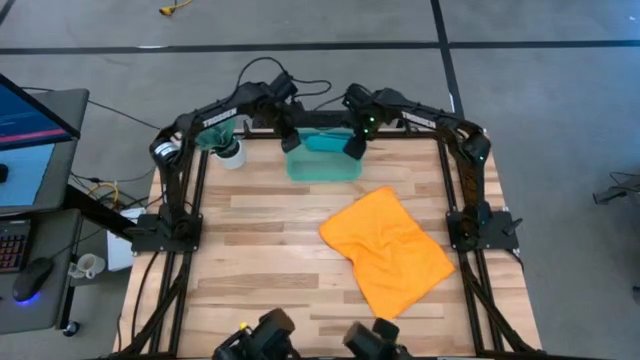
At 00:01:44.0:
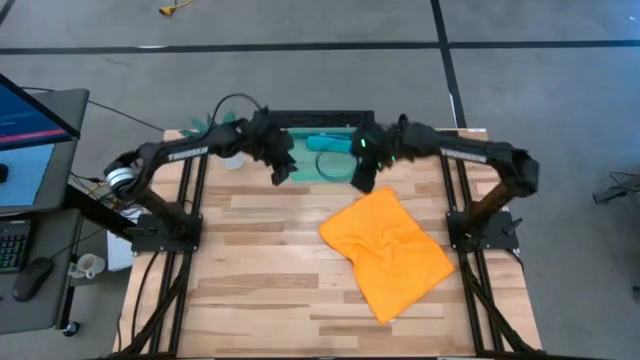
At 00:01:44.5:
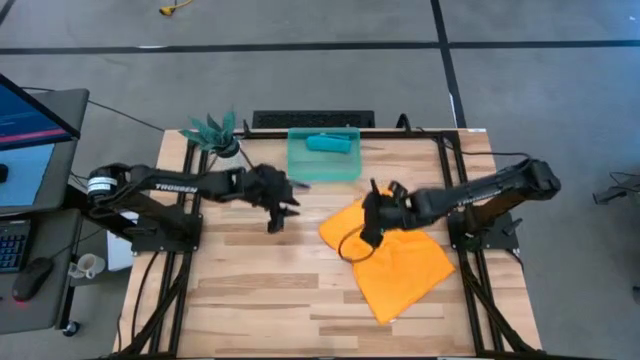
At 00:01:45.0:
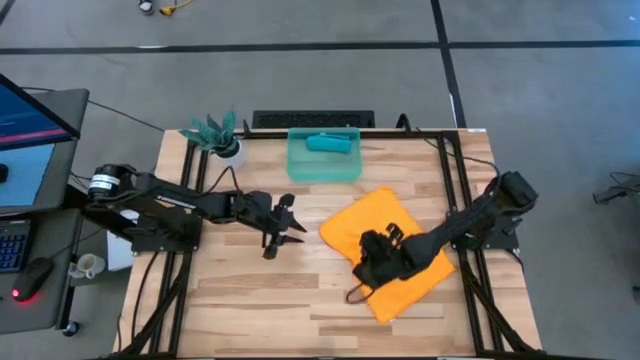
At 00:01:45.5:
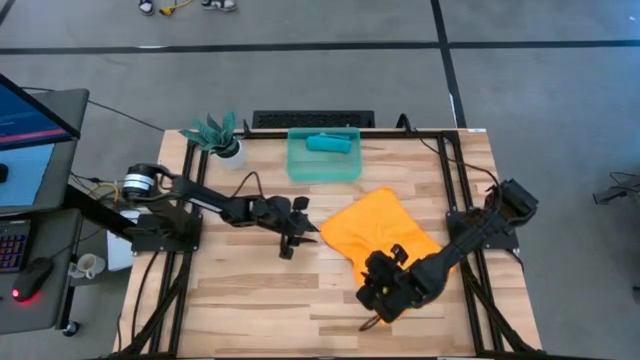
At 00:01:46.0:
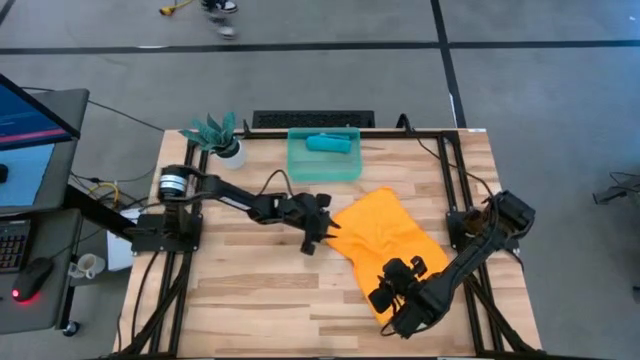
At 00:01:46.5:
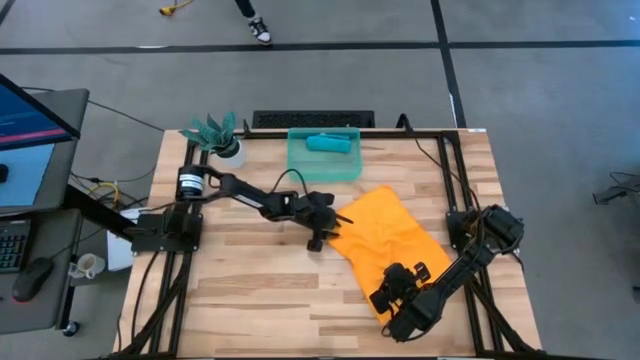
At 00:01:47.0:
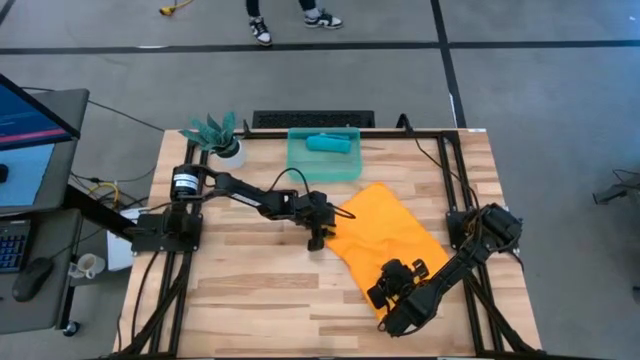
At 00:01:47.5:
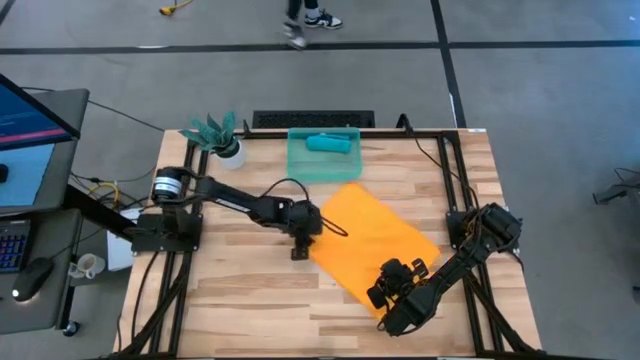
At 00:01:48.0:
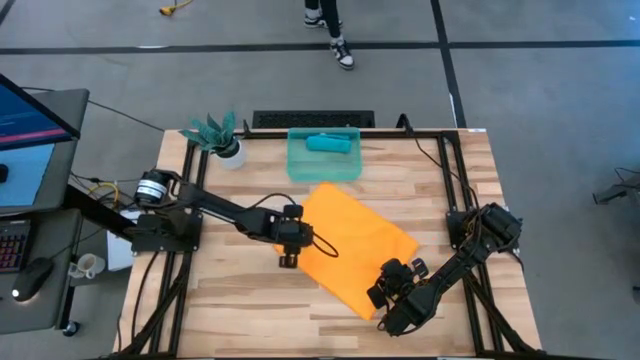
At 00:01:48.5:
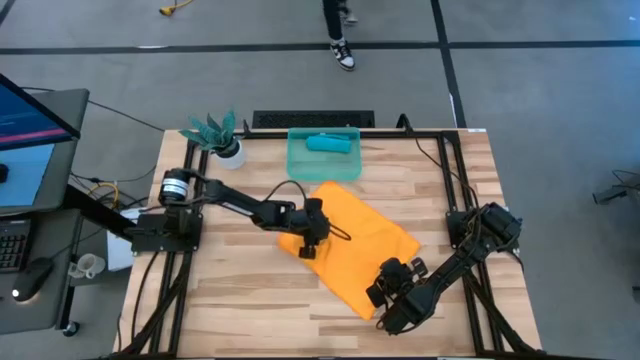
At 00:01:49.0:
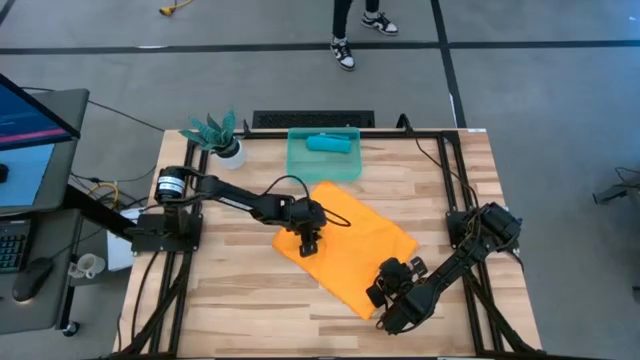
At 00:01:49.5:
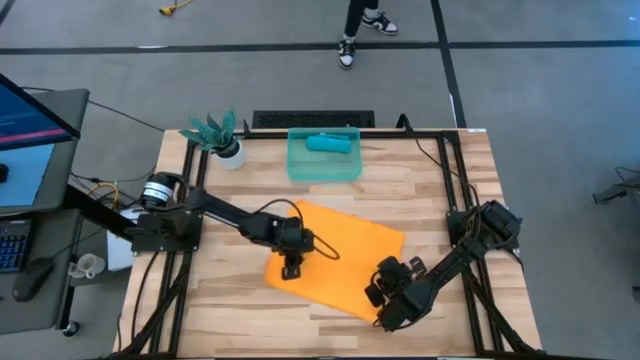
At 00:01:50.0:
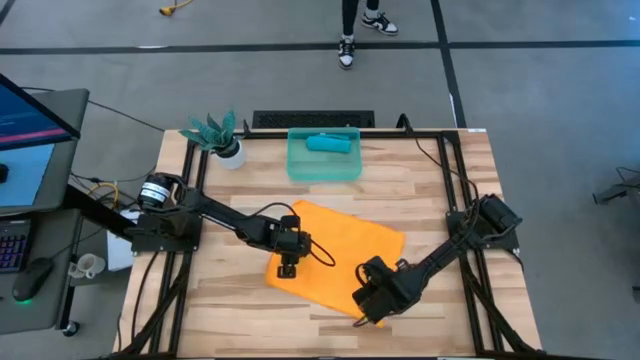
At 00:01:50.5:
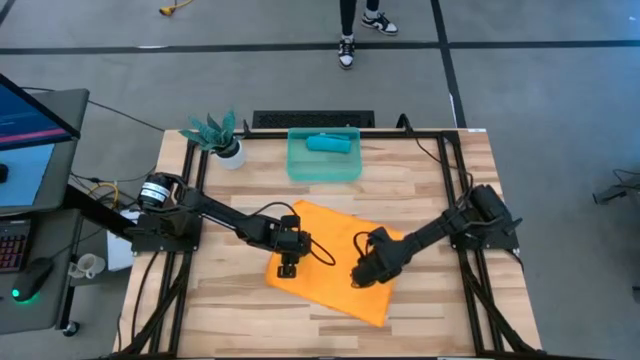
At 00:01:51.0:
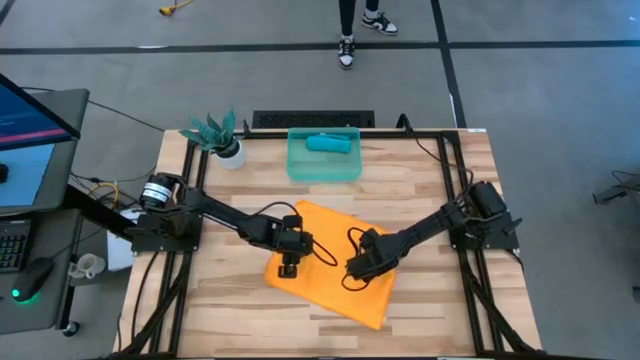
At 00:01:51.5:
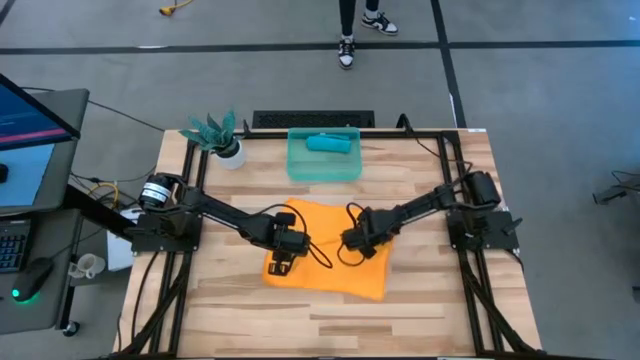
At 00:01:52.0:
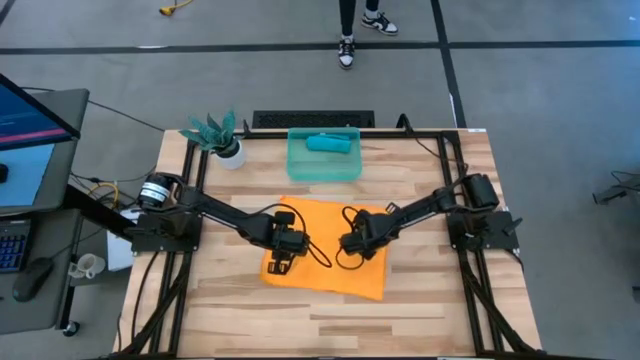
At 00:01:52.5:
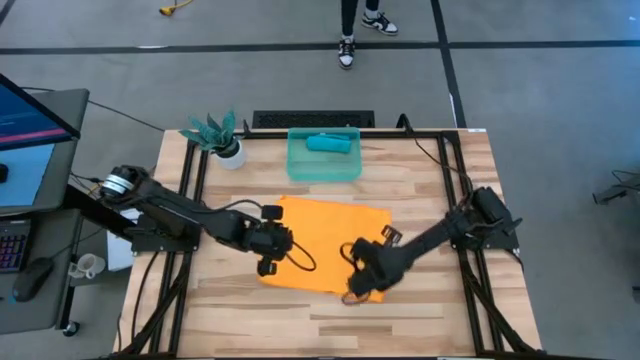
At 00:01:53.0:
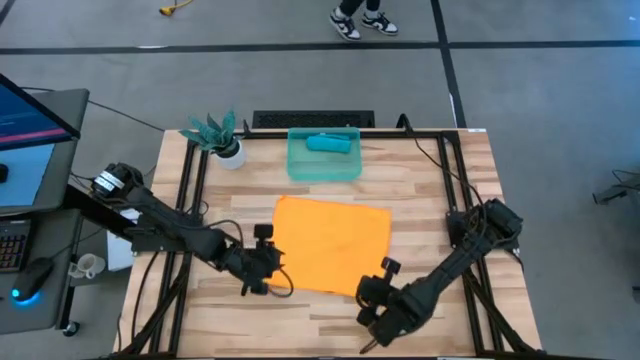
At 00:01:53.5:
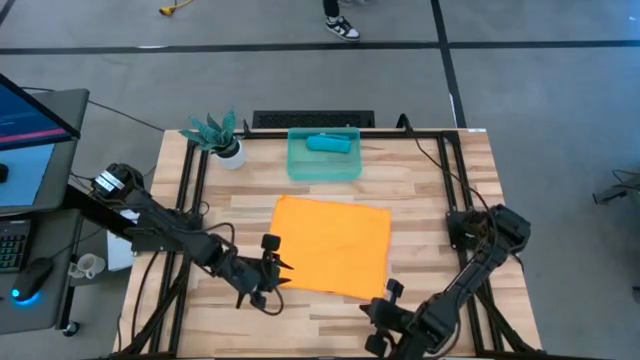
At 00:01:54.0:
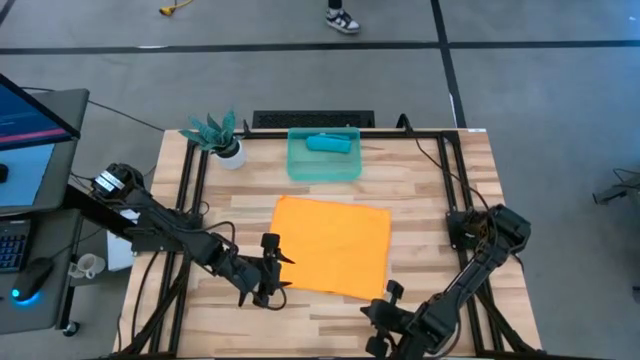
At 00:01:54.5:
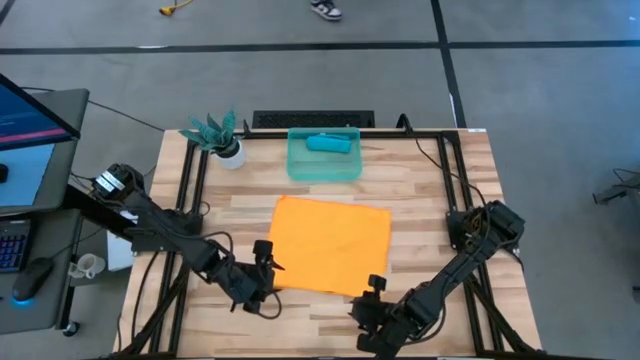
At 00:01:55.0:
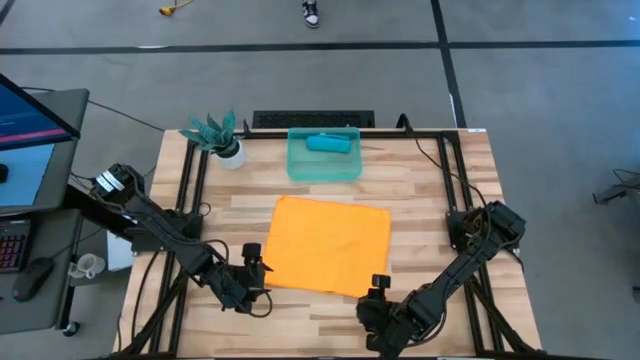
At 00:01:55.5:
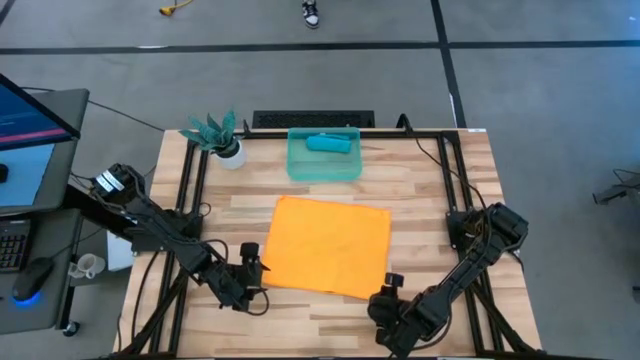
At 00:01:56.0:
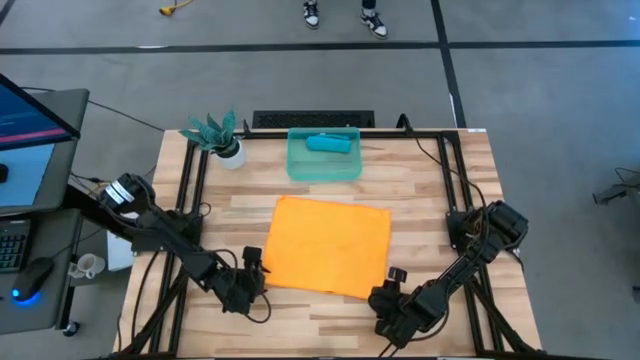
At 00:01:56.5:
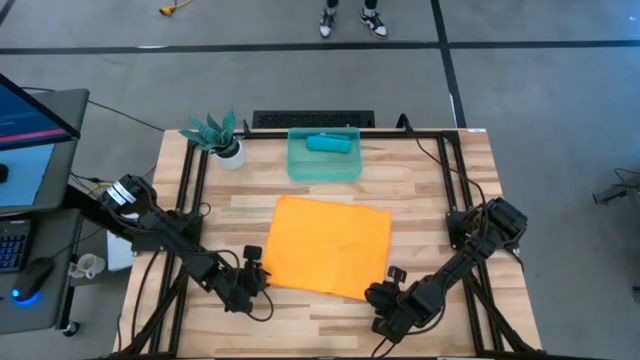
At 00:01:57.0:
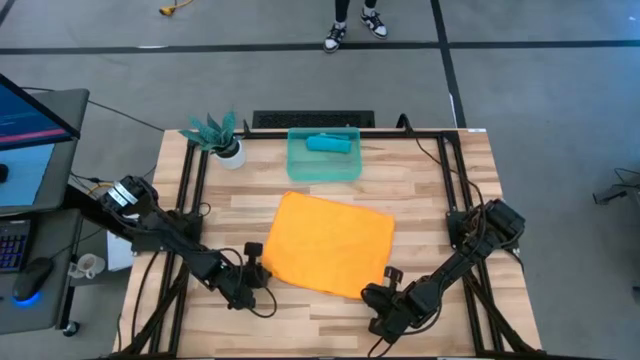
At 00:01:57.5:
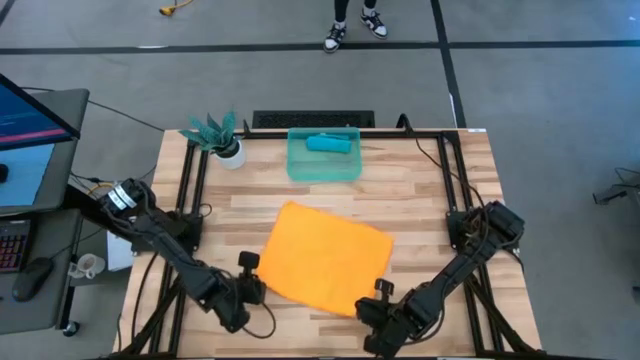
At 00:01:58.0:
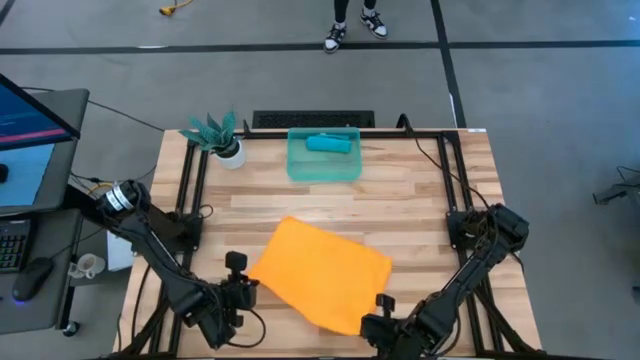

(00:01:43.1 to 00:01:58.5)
Task: Roll microfiber towels into tight, uniform cylinder then place into a basket
Fold the yellow microfiber cloth

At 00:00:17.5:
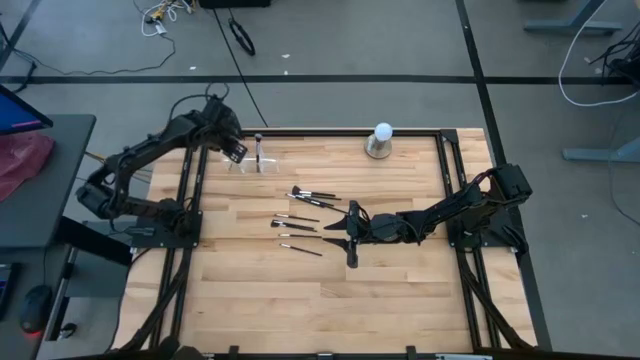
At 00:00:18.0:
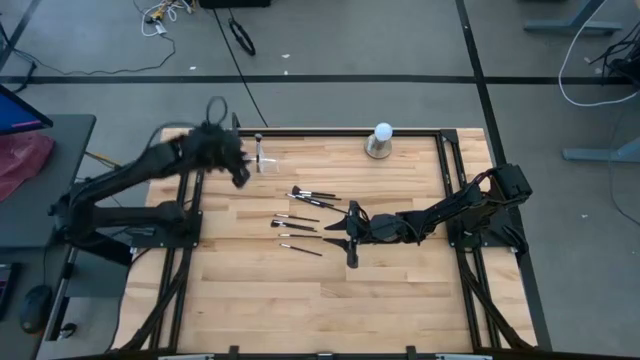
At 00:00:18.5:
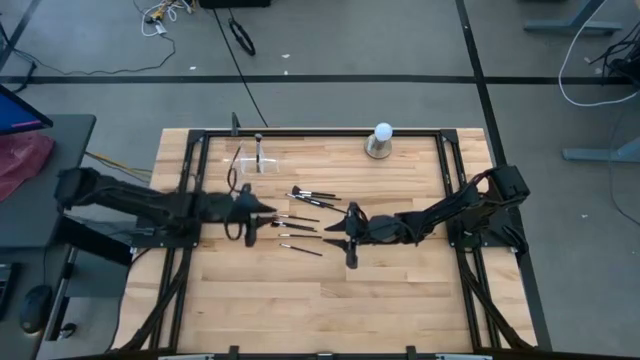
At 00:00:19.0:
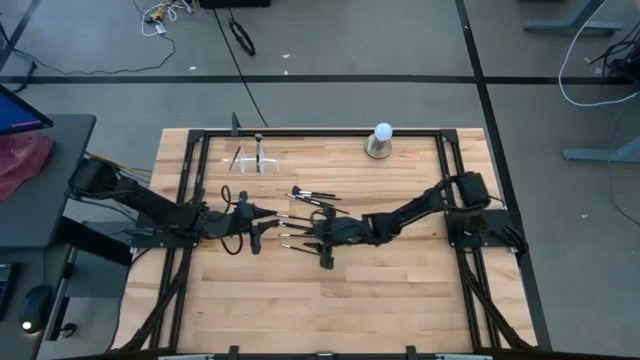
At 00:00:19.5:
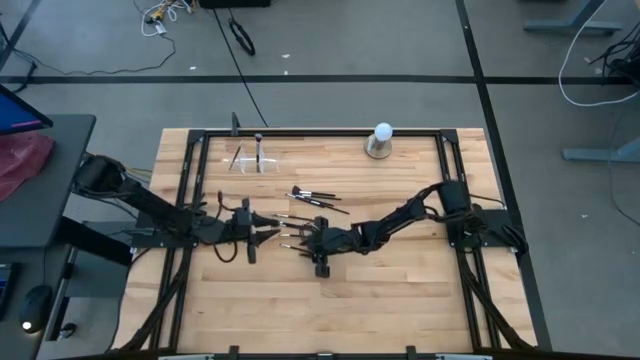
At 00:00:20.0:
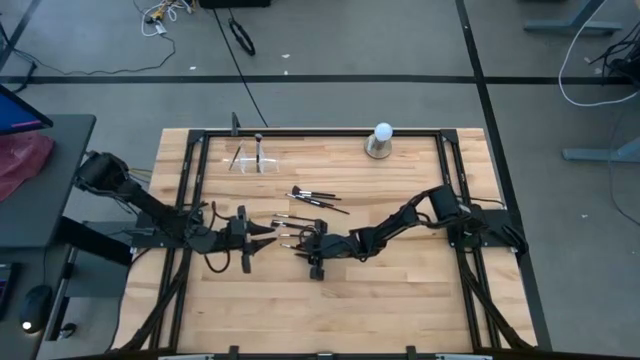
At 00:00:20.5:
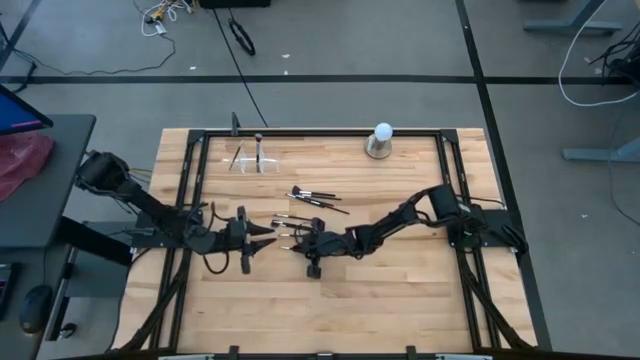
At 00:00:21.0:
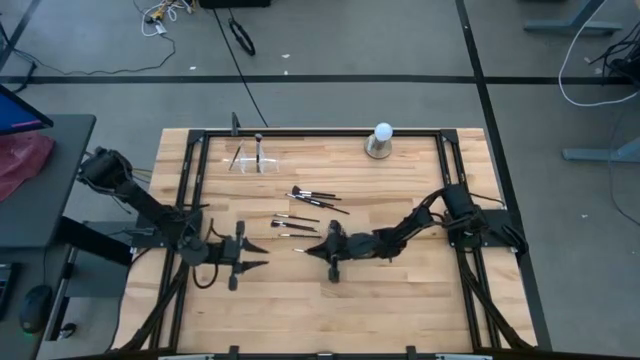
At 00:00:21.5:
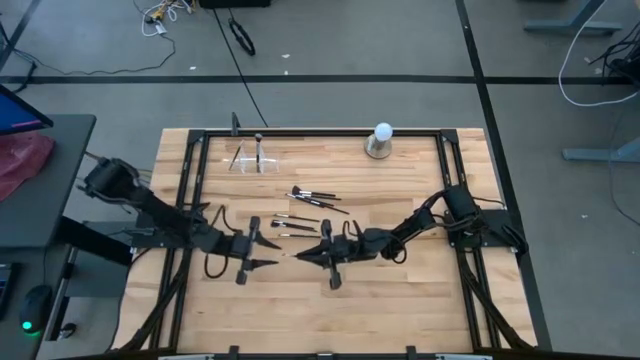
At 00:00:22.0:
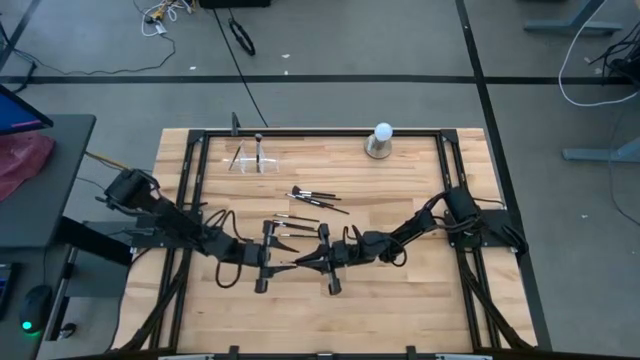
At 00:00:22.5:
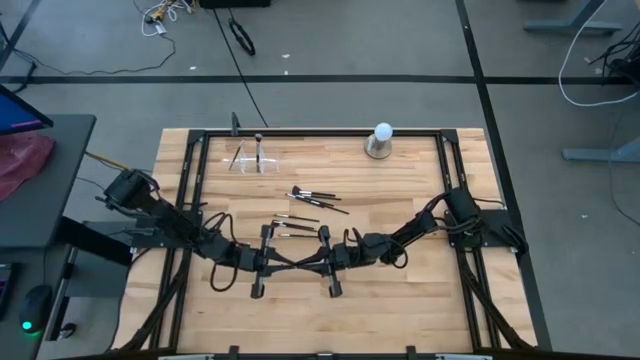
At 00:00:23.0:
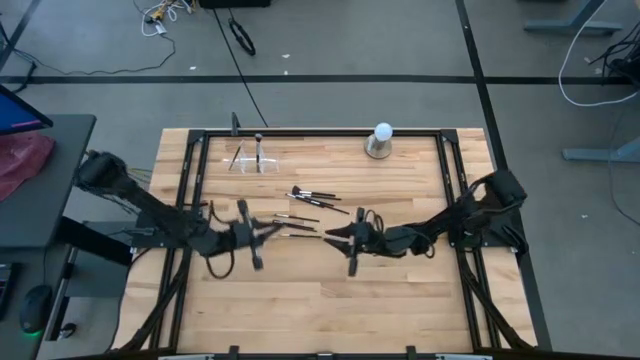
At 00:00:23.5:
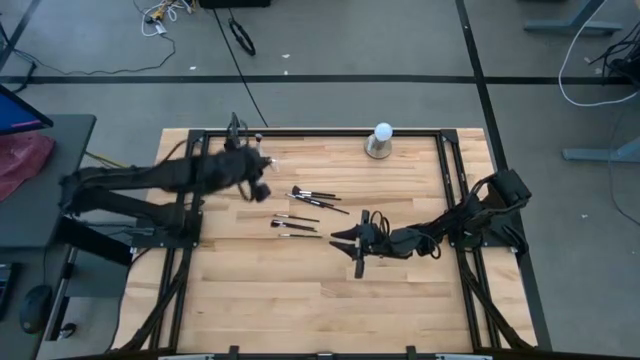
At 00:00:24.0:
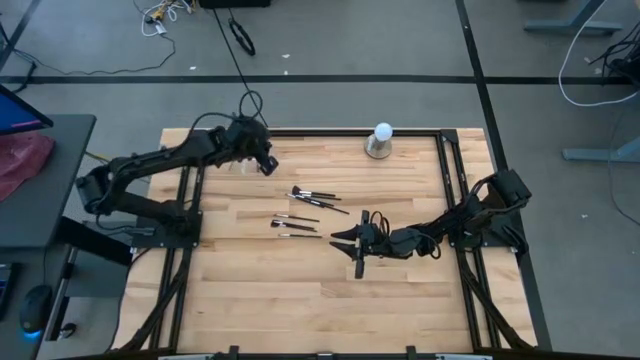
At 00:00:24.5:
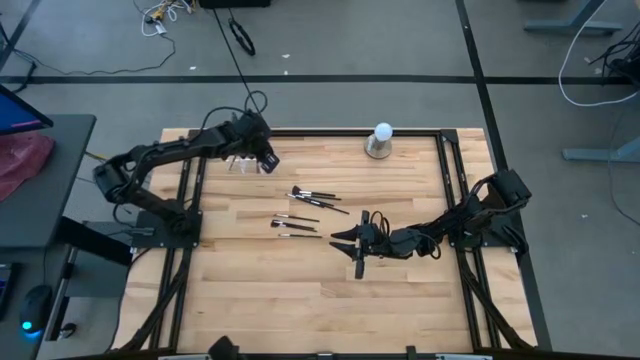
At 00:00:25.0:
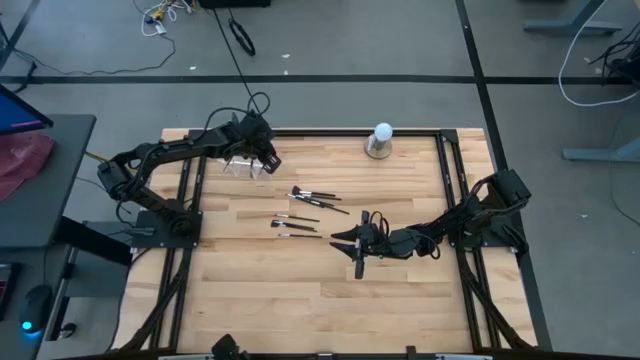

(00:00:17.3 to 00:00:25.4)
Task: Put items in baskets/containers
Put the eyeshadow brush into the transparent organizer
